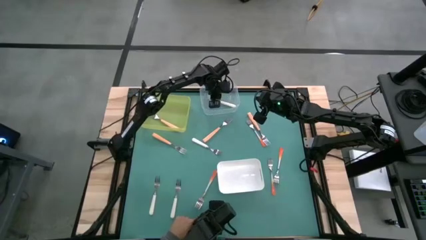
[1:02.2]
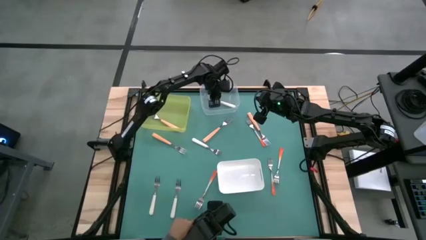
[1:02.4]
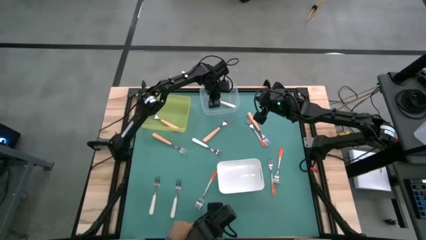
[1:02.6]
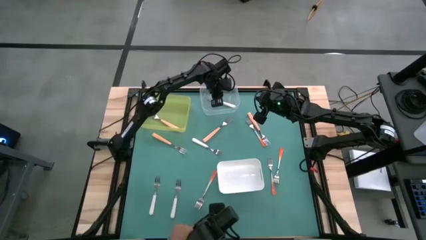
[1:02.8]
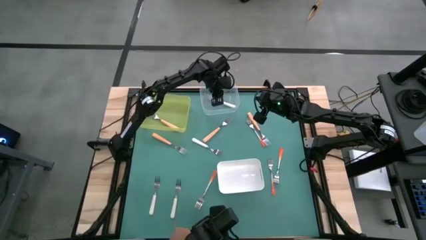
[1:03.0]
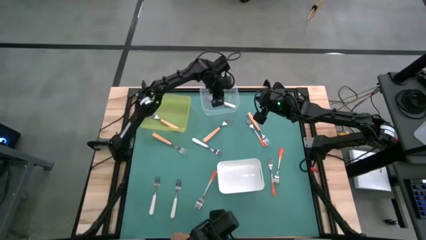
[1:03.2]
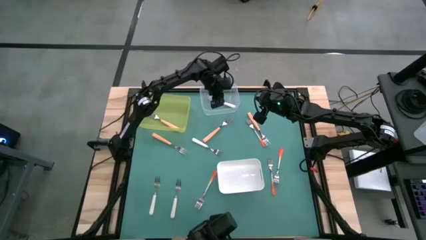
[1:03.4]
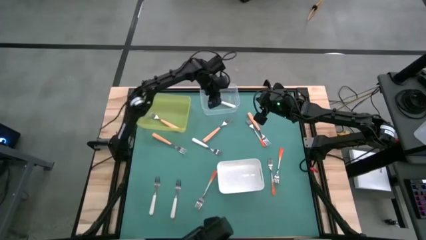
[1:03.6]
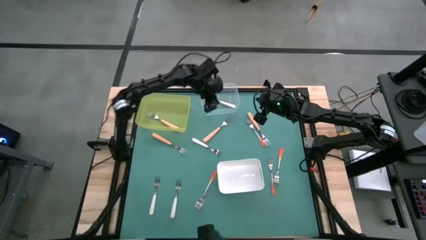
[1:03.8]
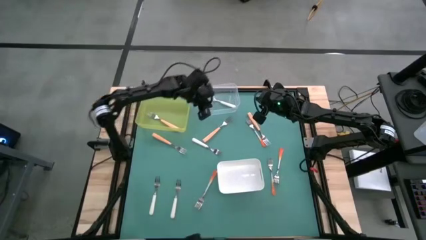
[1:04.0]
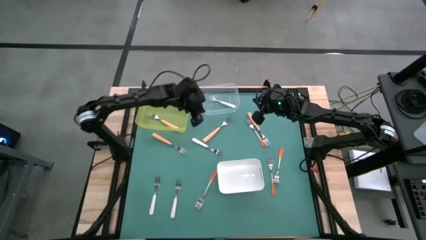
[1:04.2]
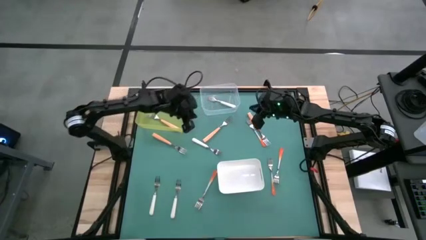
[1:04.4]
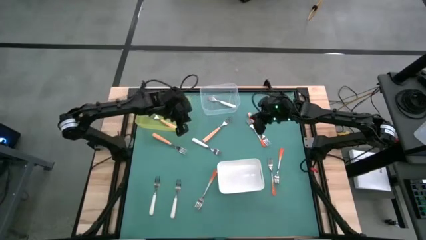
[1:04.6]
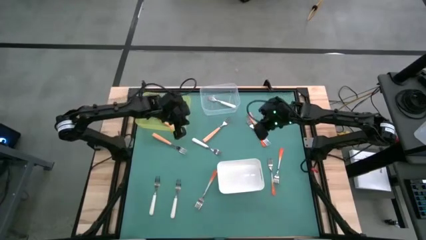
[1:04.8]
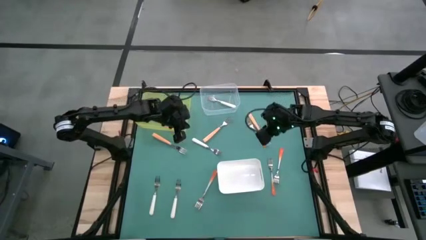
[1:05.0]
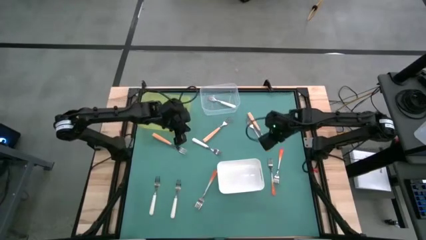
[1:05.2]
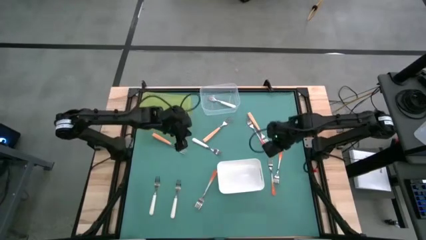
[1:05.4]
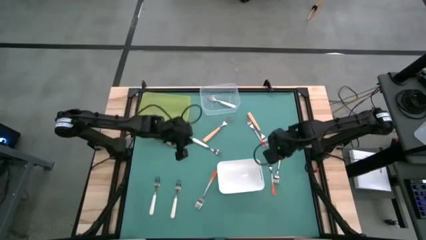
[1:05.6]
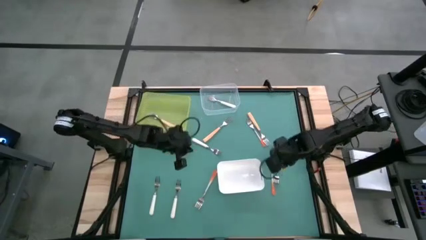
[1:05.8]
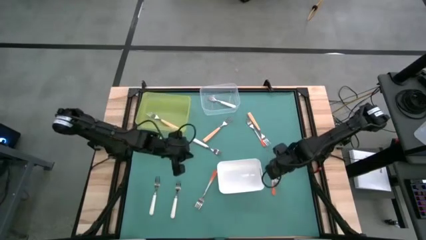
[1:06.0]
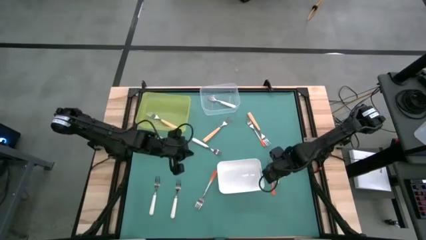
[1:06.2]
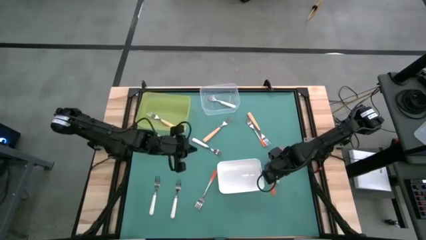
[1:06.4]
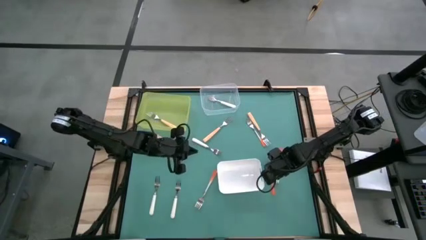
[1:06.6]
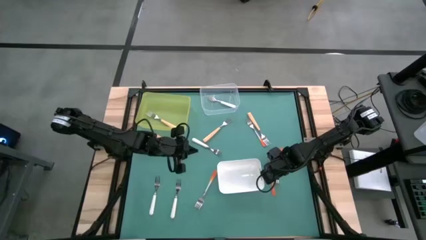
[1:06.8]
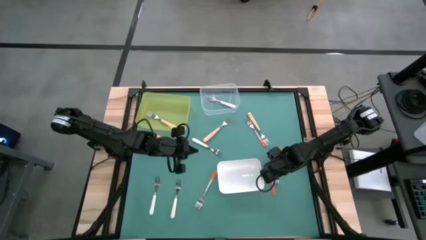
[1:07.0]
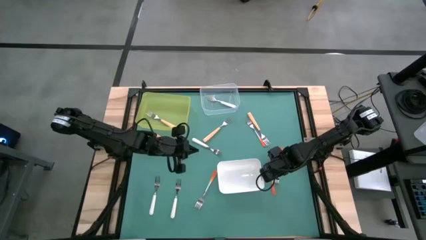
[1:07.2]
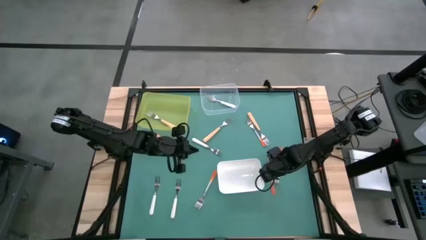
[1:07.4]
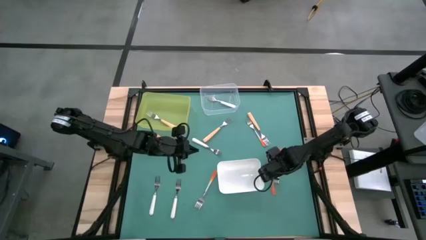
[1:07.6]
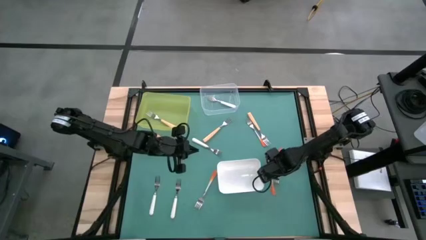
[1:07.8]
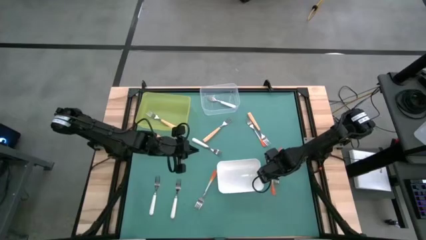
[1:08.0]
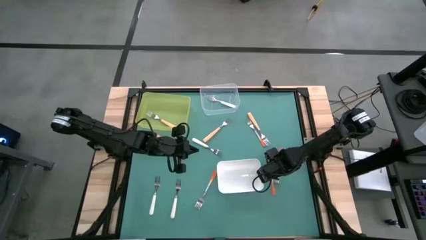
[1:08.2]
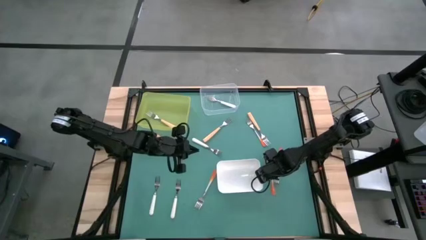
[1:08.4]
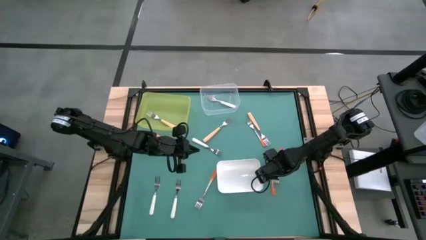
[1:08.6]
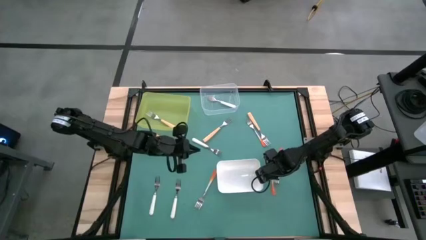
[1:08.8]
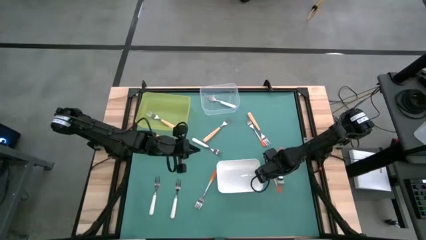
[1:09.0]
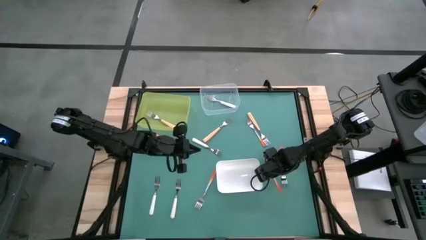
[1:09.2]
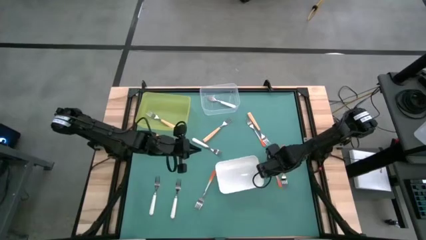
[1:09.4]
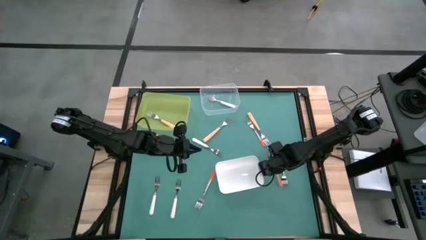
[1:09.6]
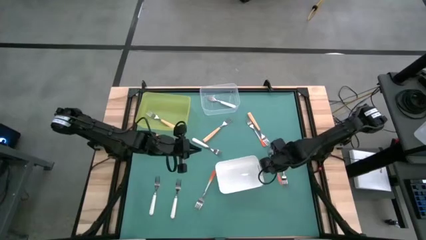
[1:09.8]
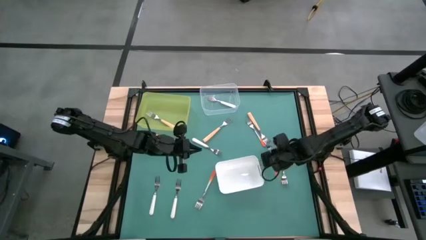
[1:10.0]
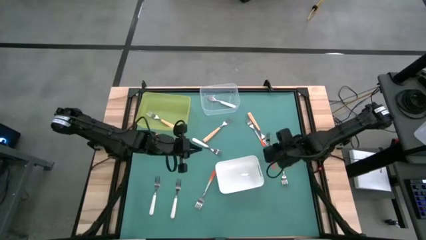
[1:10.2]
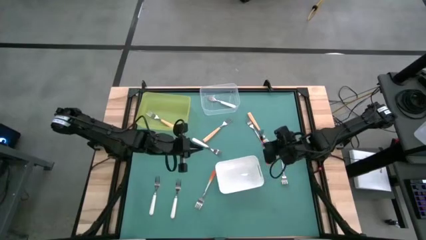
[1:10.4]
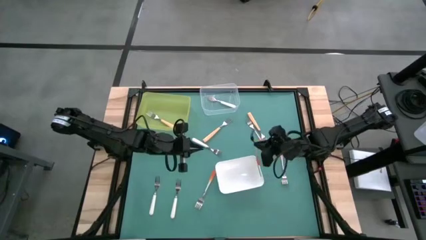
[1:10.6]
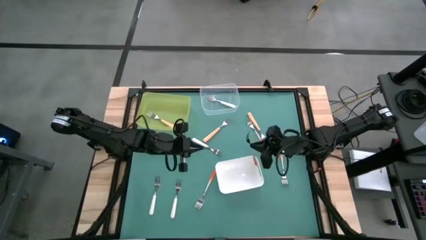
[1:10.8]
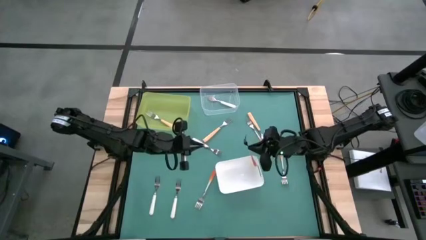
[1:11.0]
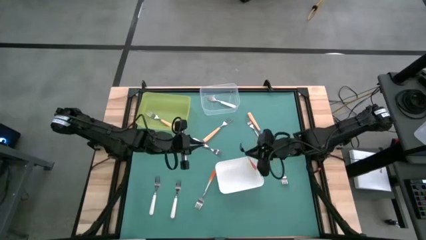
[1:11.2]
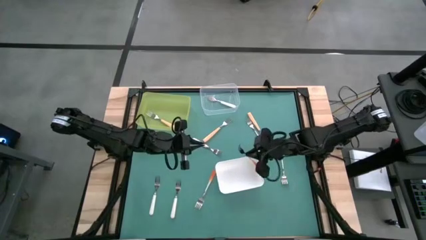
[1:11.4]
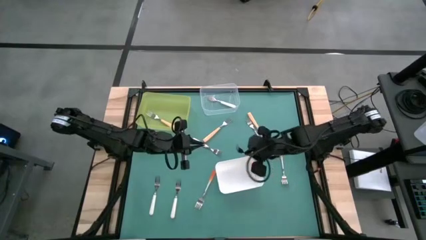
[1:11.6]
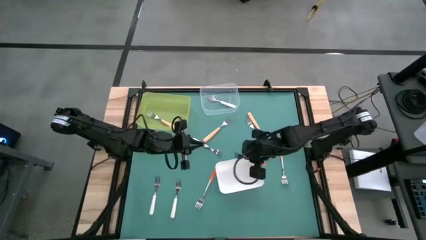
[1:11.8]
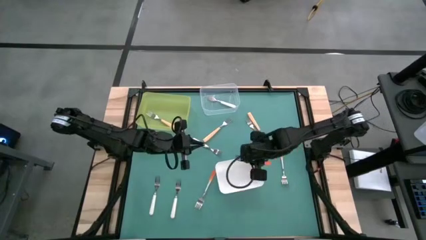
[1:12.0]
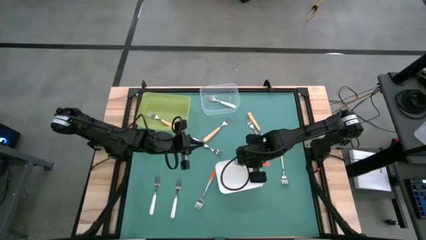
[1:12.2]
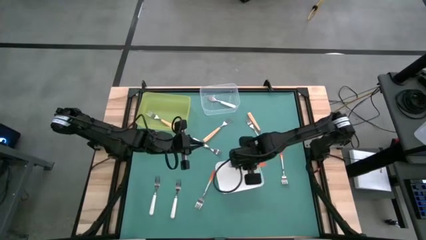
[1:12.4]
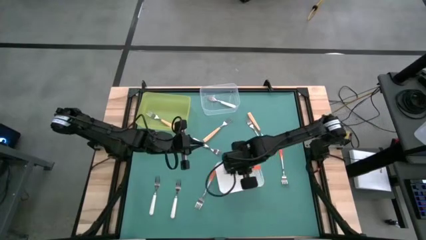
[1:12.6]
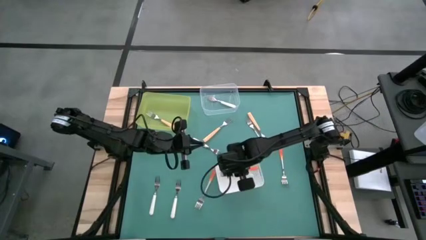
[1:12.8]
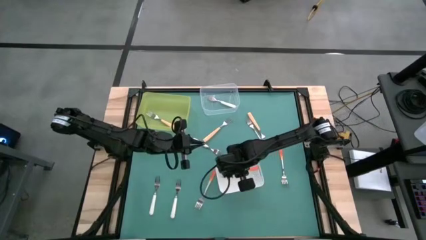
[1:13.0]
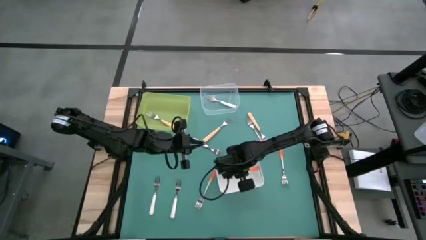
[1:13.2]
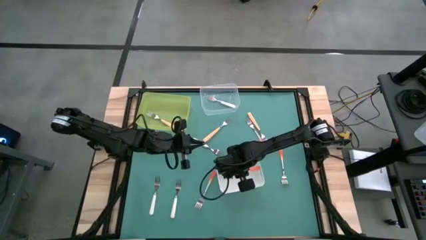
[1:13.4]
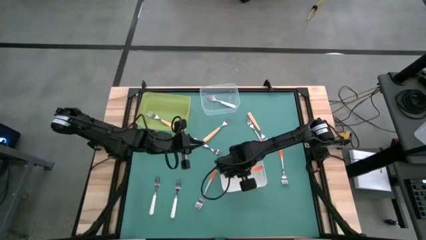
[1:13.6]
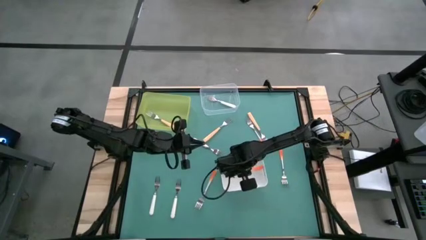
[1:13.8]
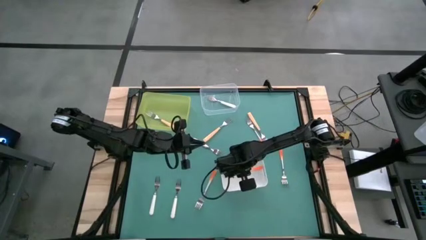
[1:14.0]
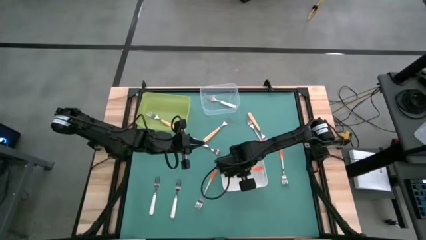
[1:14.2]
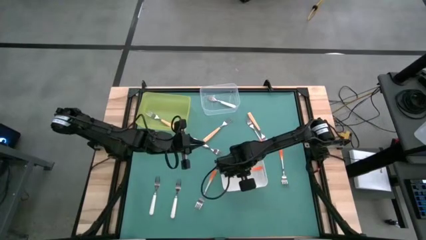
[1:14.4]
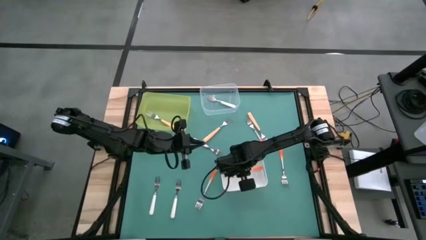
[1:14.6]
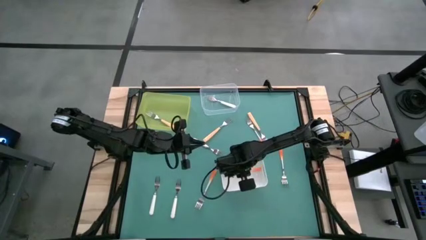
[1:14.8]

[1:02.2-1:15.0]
Task: Sort silverware by color (type)
Put the orange fork into the white bin

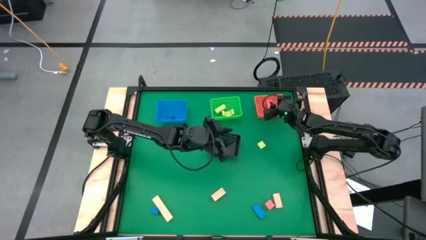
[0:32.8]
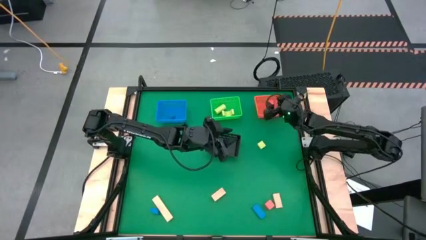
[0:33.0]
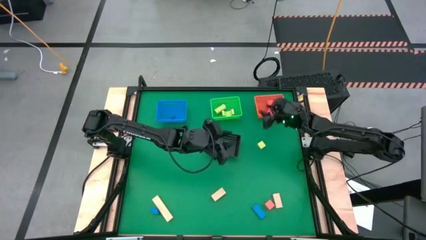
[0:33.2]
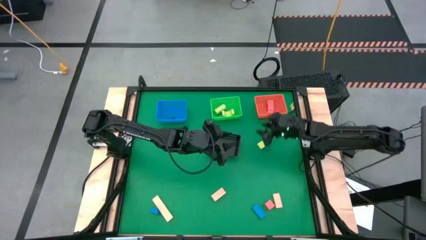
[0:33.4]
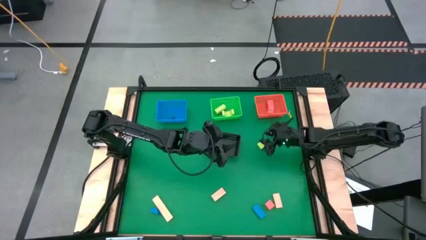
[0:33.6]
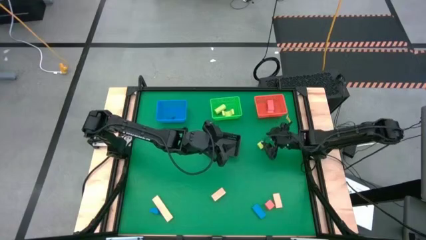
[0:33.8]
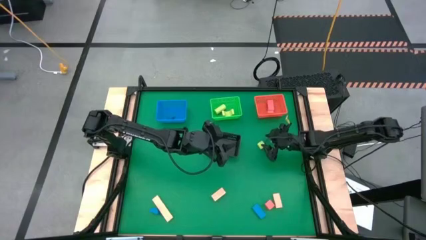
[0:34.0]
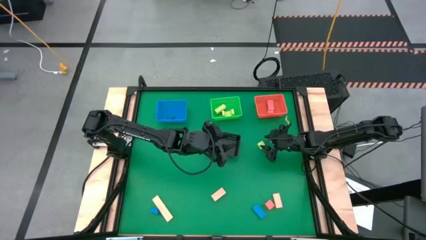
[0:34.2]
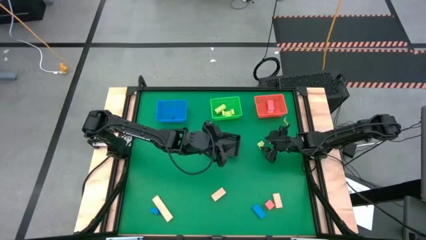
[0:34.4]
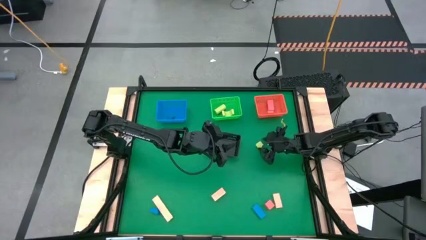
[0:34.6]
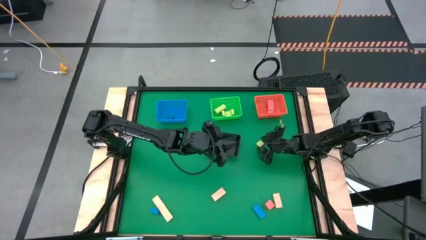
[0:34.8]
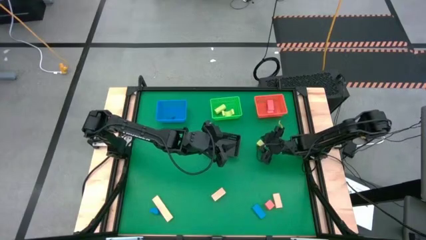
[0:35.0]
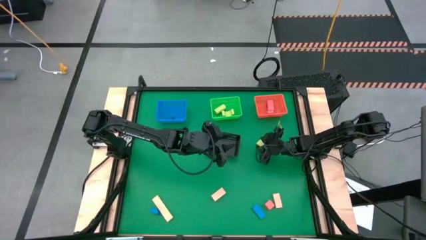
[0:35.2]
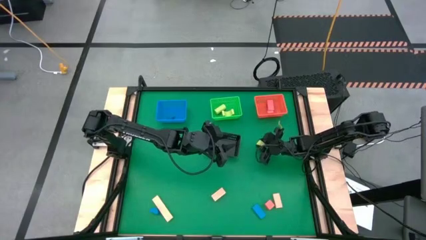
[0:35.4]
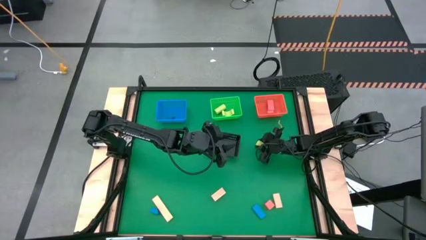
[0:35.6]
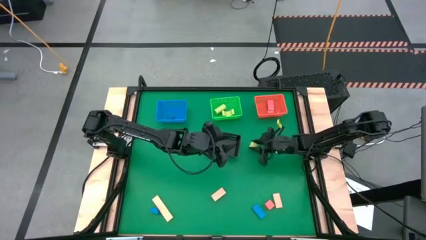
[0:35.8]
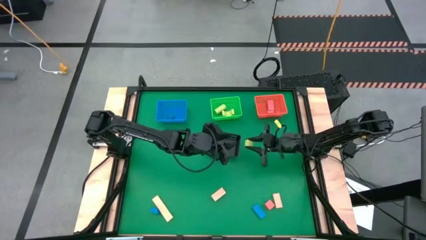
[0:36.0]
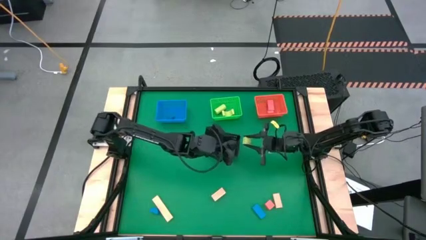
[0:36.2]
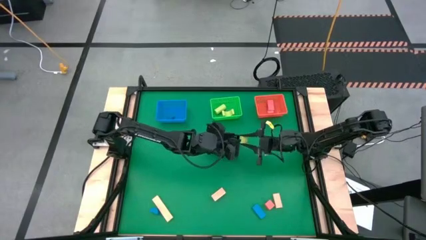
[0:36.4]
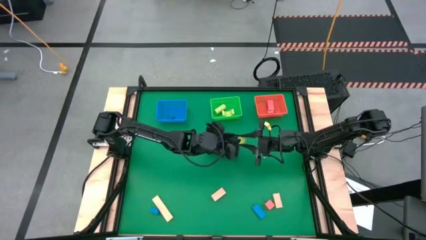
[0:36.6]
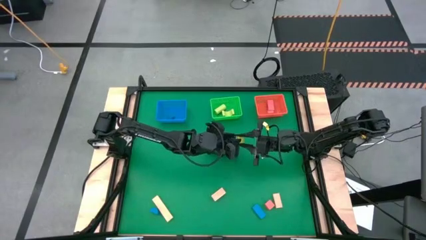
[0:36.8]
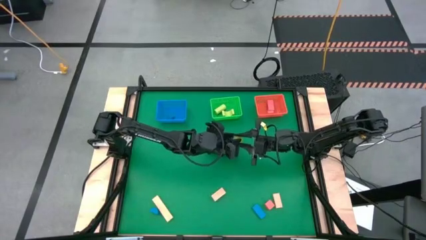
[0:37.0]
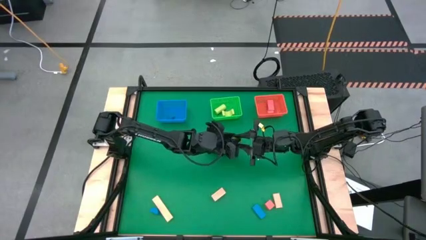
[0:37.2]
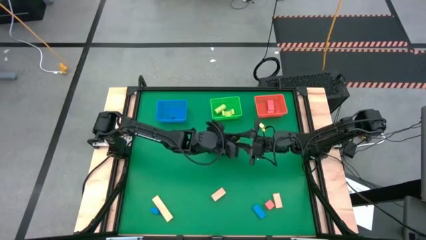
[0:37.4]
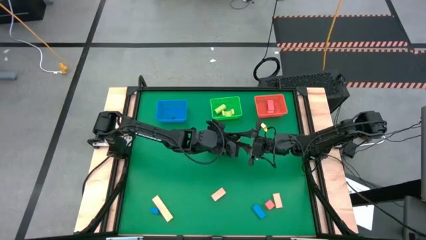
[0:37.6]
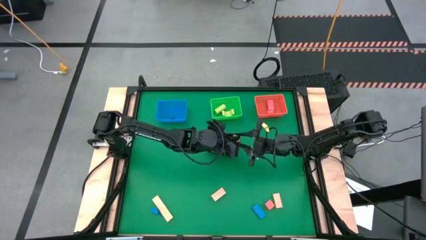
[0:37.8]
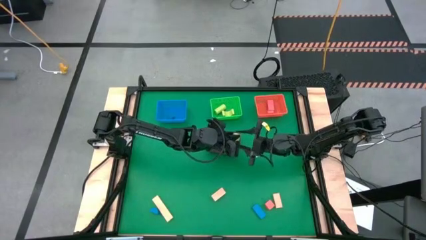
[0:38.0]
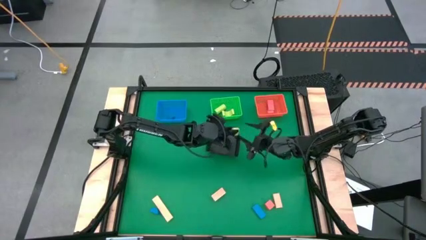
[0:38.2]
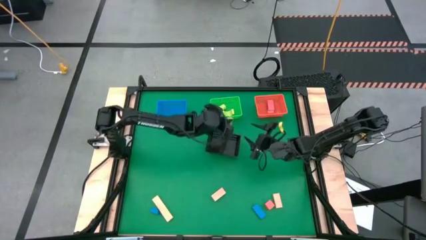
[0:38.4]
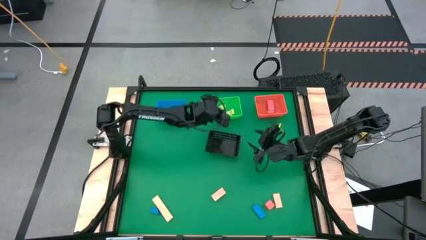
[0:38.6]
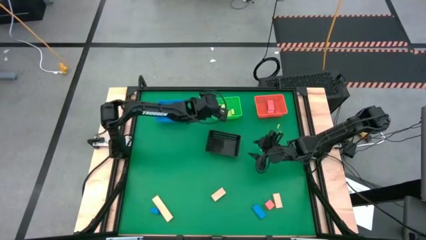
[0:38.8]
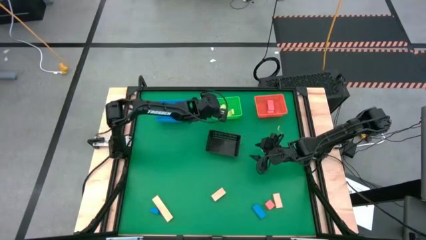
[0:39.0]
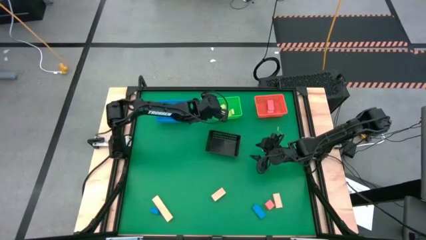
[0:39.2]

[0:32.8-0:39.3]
Task: Sort & place blocks by color
Put the green block into the green bin
